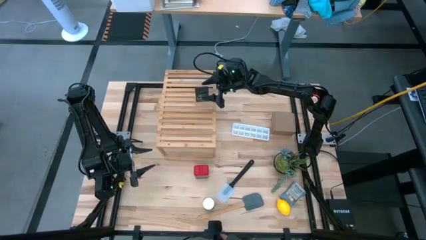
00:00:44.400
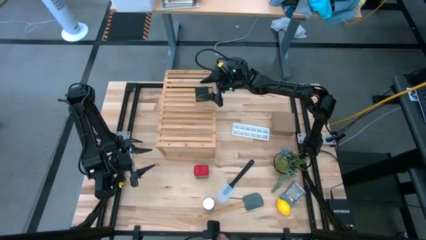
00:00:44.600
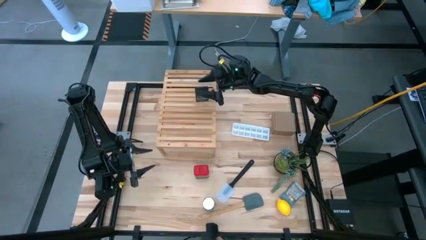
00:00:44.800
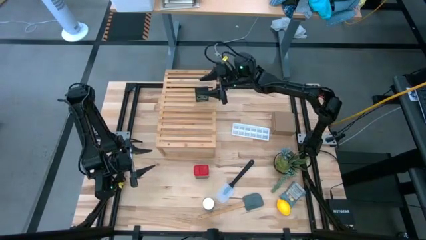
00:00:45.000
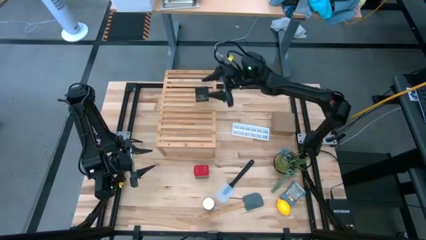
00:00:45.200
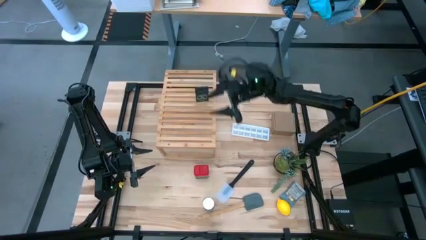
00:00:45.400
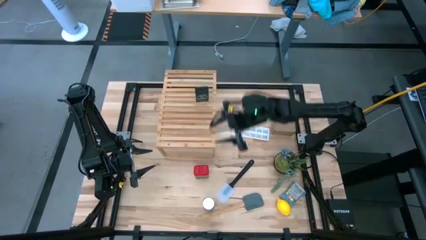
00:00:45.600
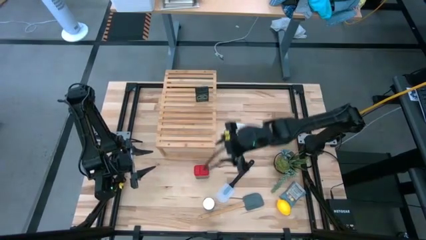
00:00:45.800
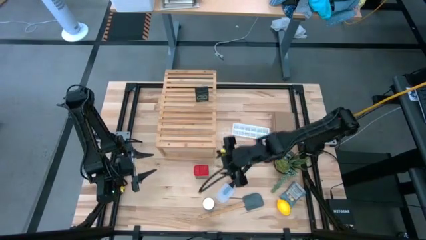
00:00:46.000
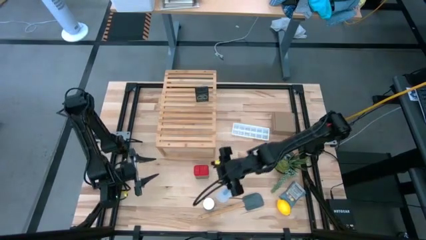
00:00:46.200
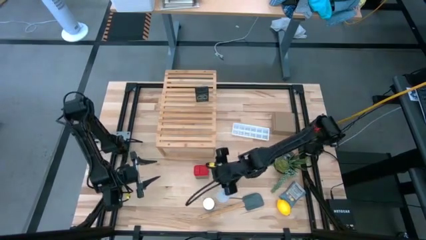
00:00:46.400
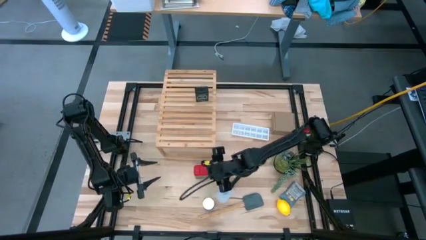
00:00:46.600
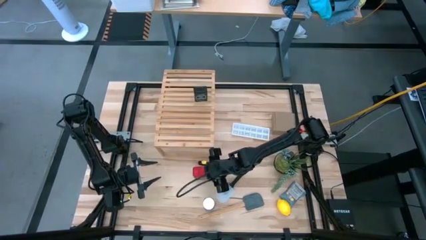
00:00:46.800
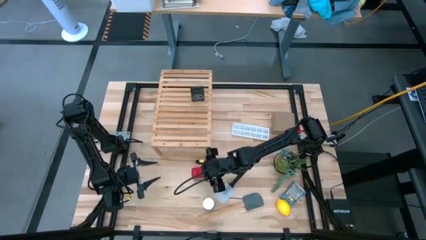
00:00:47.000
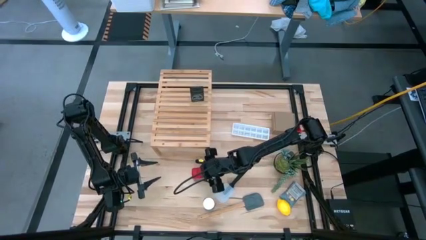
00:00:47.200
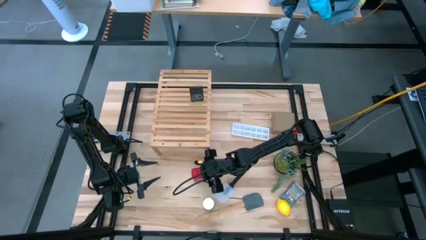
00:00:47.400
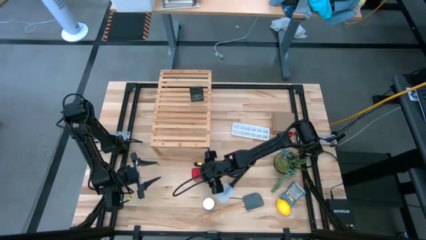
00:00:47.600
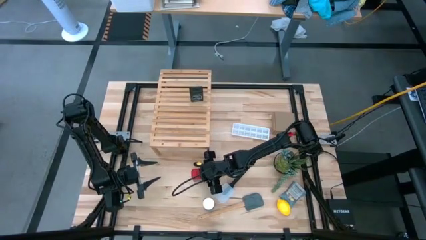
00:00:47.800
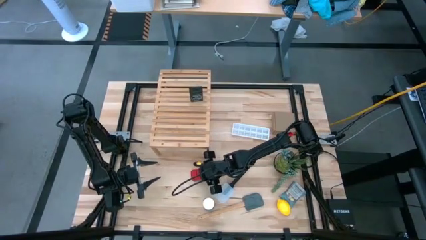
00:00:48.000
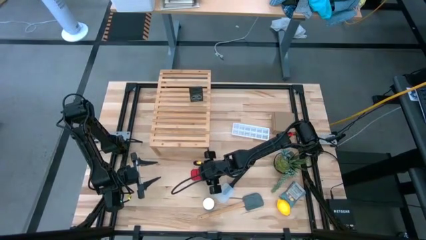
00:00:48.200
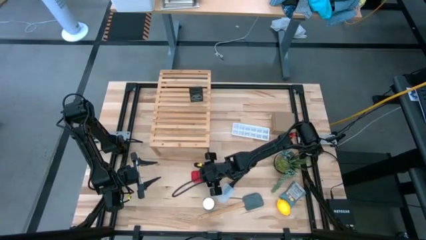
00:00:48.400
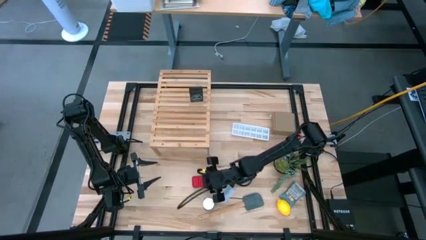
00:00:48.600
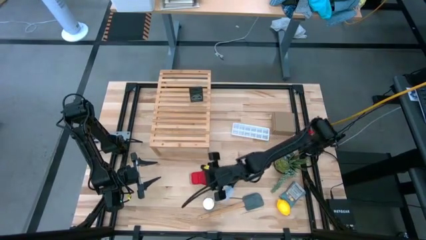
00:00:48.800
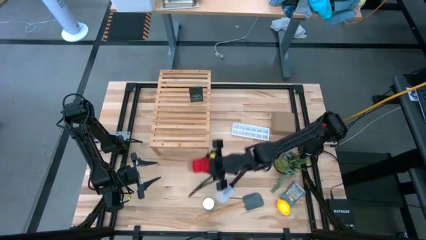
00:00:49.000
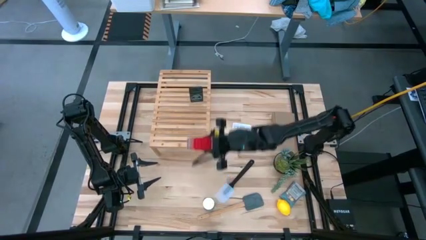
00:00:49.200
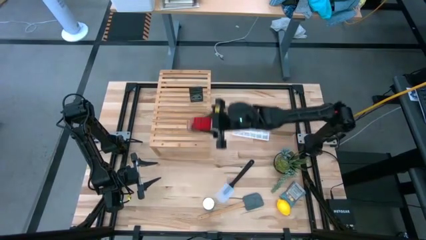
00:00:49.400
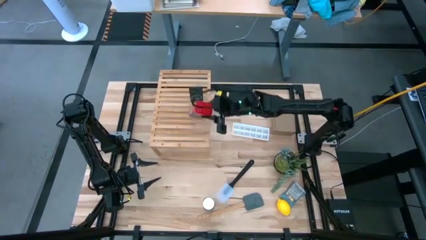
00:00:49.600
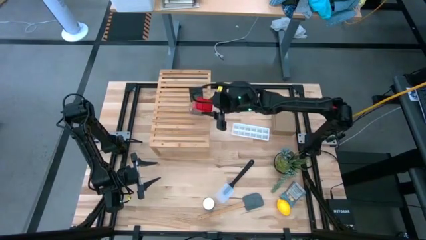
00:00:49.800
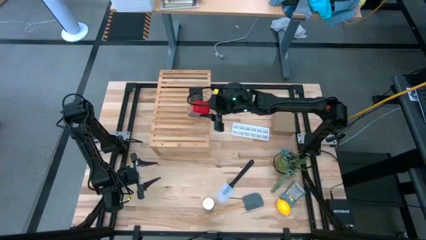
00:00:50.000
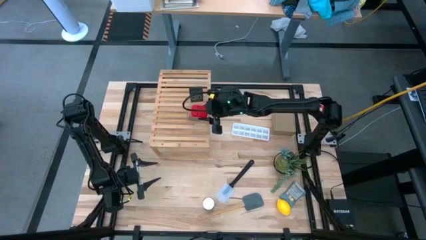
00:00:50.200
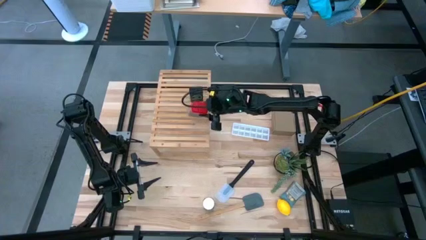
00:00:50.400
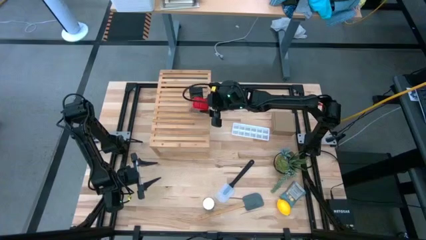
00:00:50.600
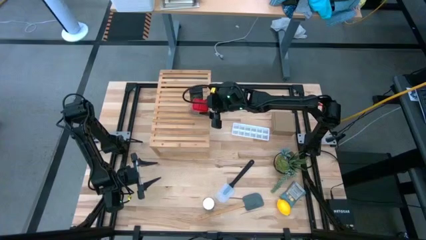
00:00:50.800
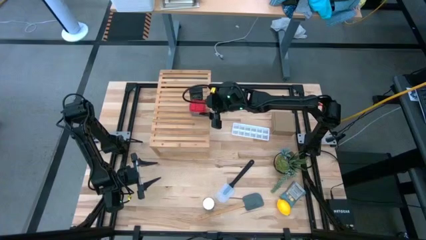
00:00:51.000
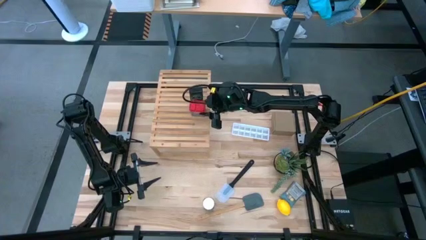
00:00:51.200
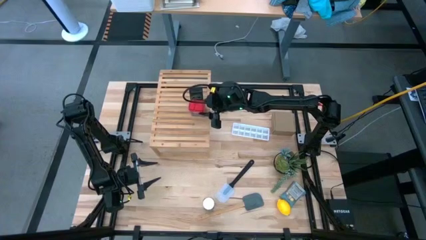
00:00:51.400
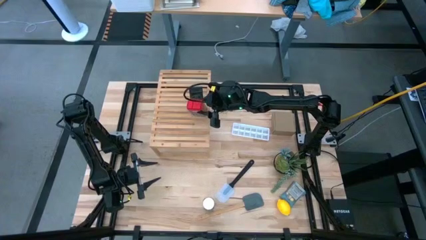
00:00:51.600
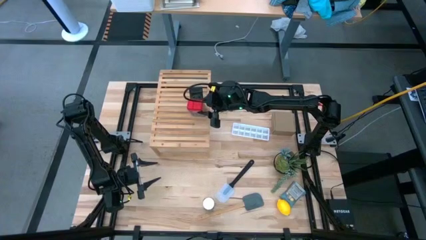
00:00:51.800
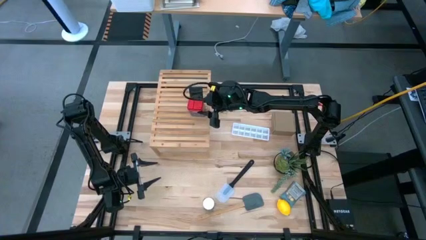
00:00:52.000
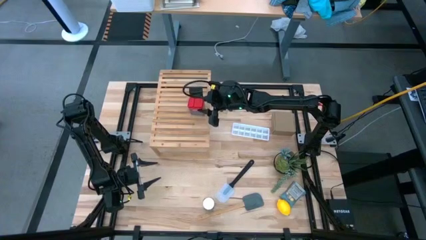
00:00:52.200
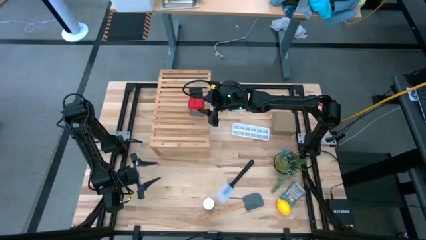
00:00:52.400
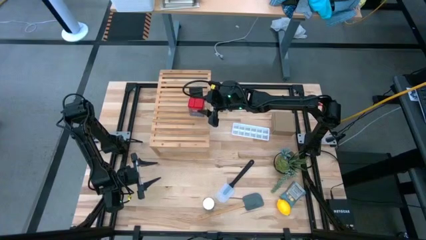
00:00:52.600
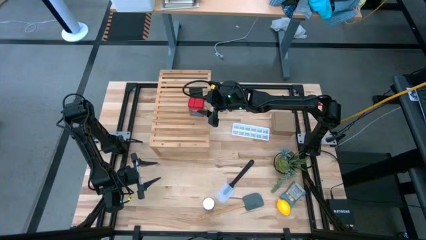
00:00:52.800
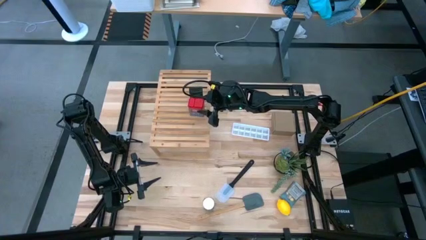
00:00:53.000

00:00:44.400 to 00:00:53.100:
Task: Shelf spices
Put the red seasoning can on the shelf

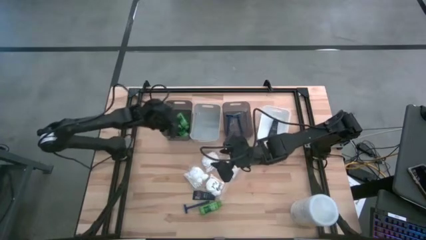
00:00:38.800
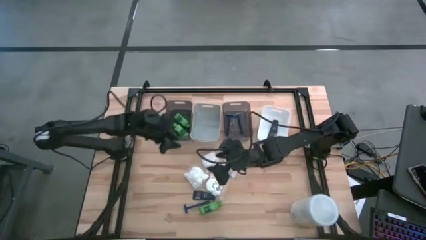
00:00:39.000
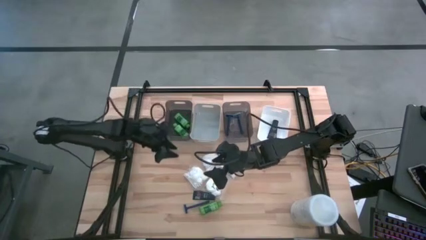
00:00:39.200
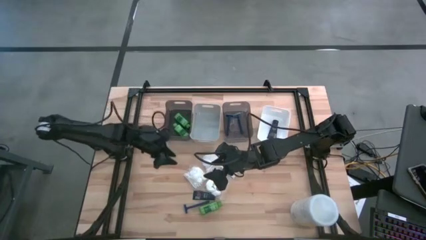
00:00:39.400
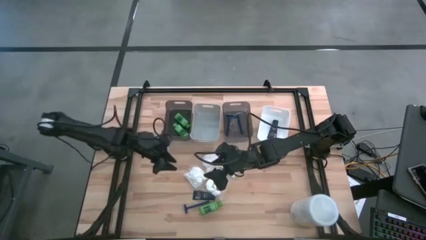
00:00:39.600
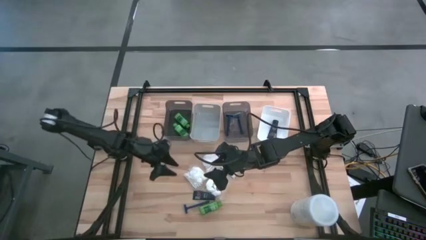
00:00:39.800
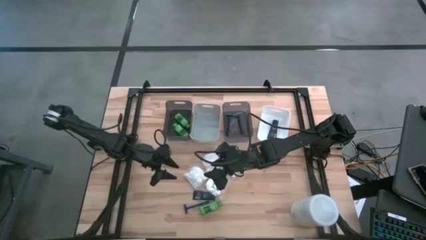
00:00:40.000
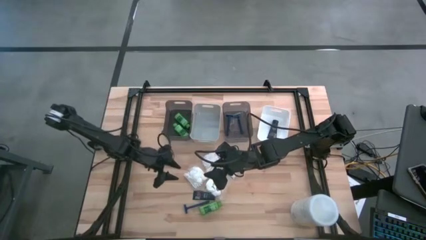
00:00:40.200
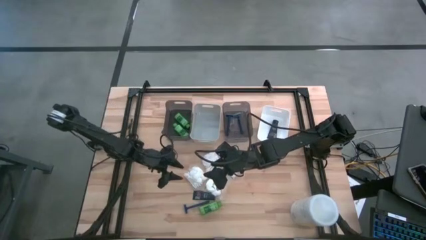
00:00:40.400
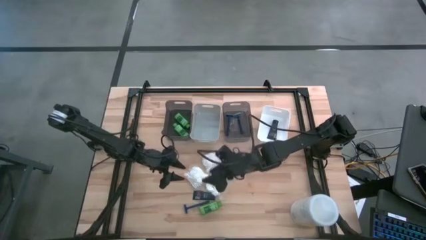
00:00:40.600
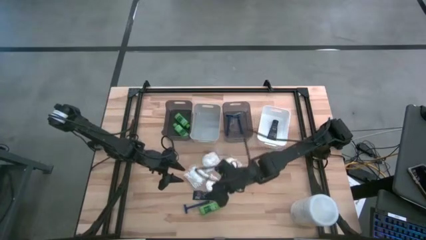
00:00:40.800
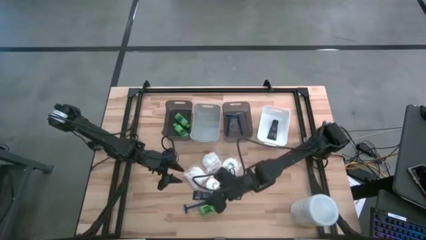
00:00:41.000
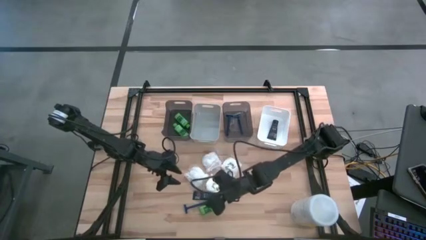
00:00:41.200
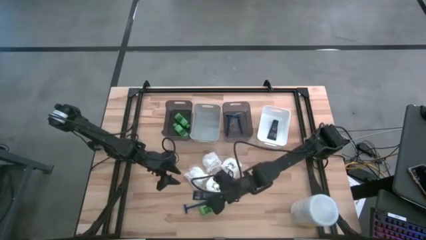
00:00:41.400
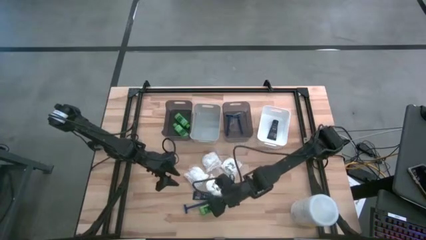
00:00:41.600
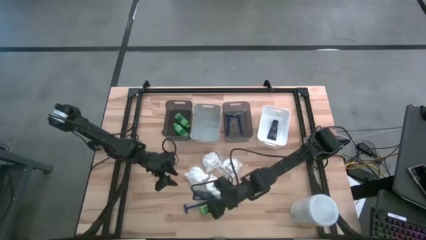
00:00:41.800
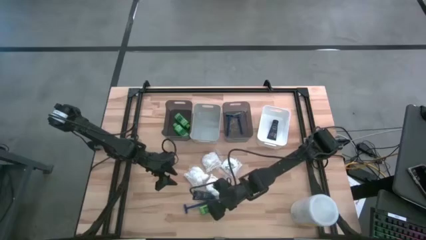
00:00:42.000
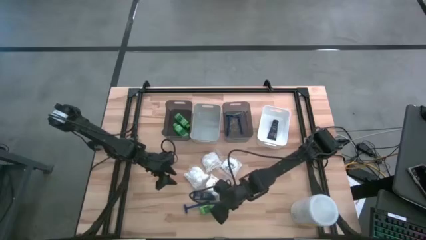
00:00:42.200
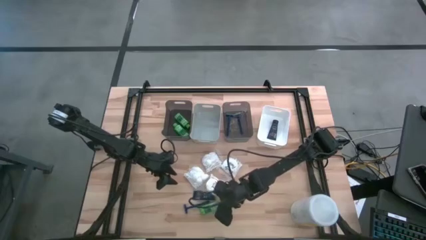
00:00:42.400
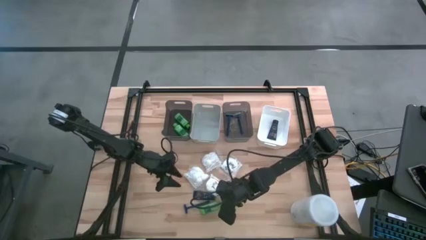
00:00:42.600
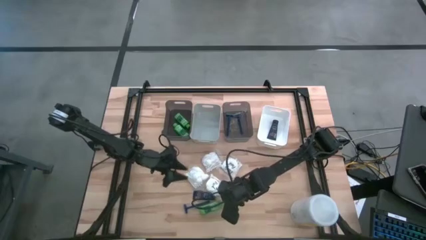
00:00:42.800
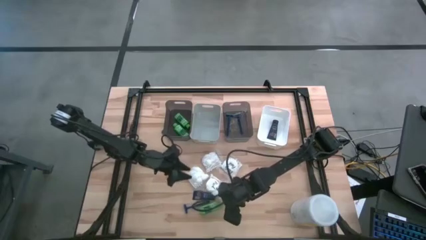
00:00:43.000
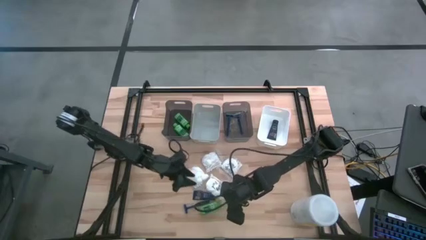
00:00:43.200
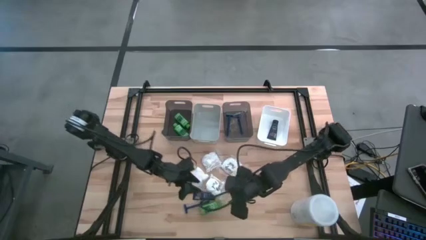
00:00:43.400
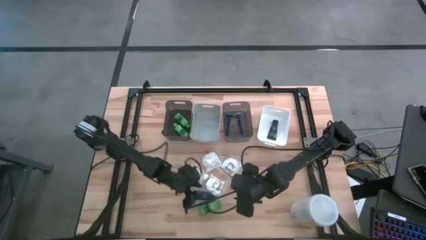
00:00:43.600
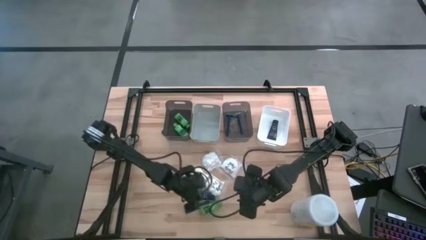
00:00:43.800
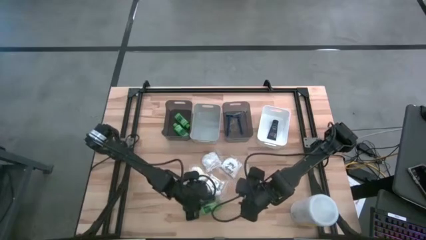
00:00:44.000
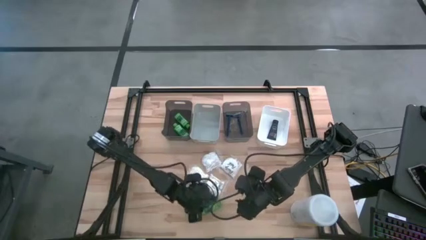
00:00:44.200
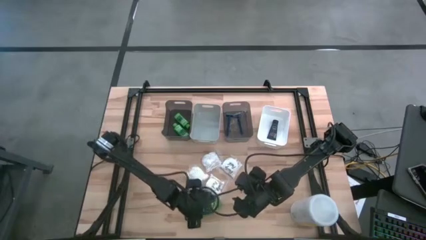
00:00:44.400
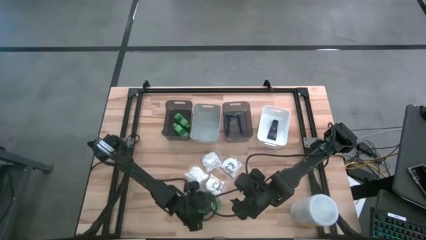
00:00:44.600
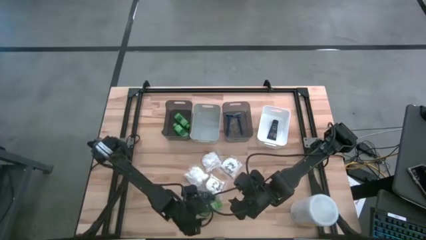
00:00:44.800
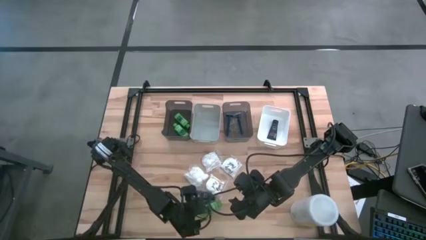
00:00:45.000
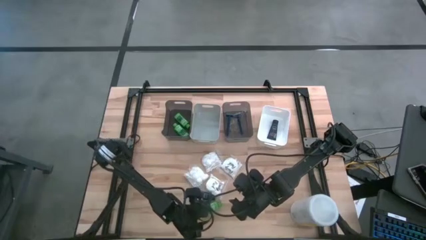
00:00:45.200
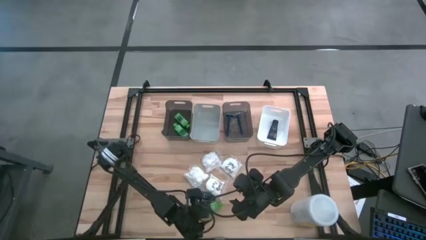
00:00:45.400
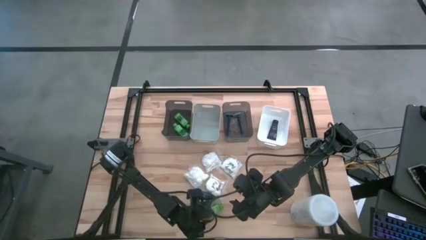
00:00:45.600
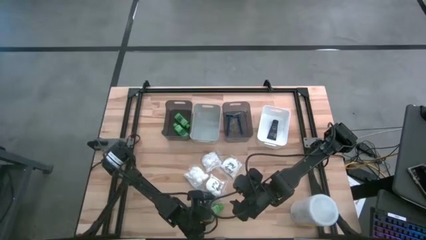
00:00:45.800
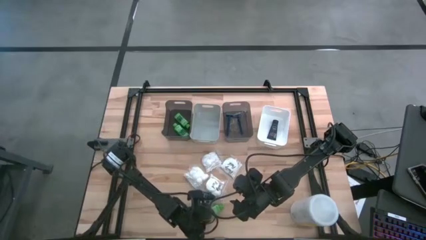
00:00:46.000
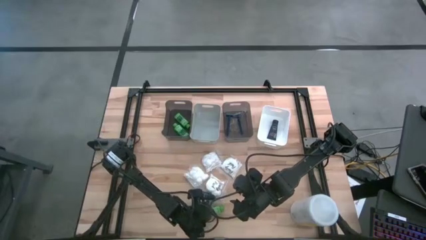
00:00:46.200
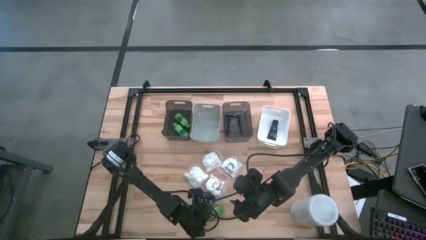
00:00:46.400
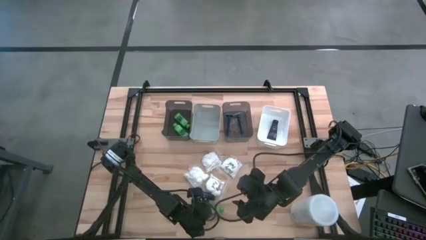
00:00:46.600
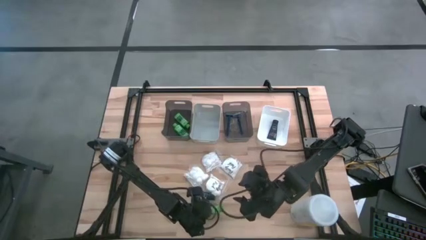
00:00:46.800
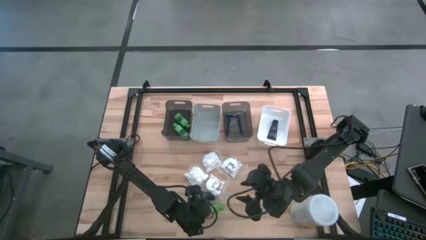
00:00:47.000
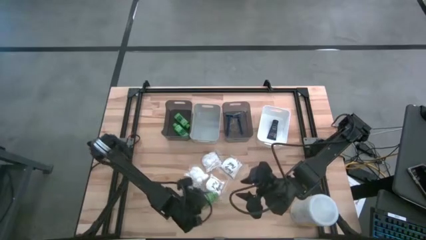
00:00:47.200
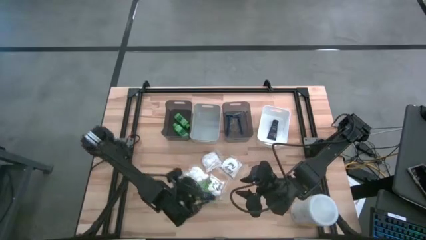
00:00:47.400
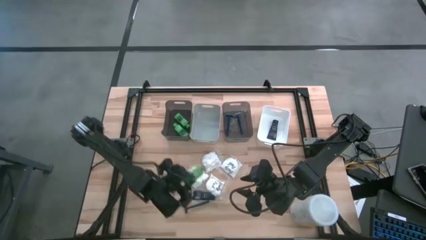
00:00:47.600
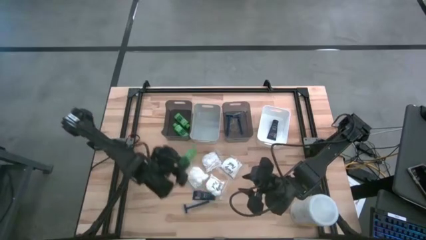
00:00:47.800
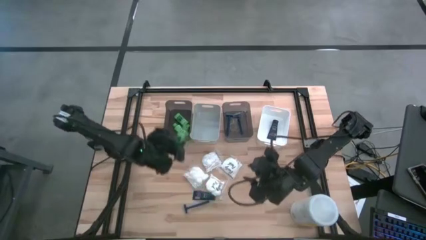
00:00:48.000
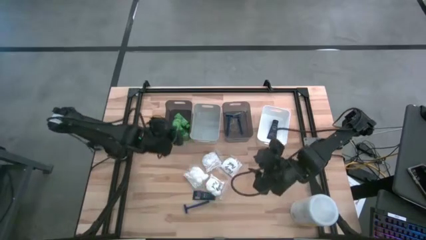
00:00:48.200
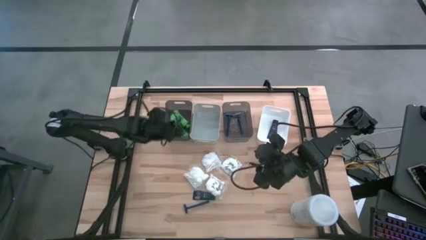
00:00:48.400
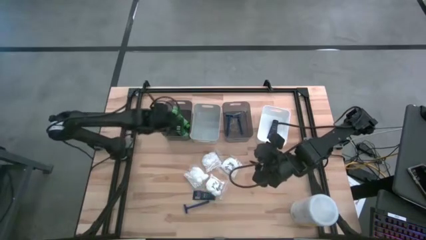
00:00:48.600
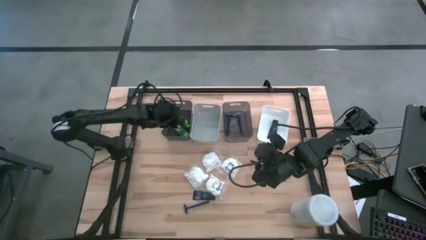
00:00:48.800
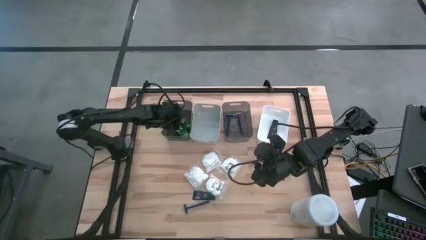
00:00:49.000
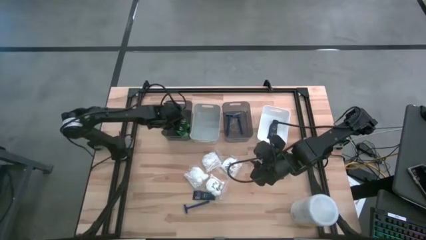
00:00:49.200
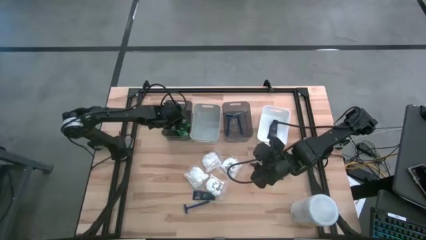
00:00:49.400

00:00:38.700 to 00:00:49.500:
Task: Pick & Place Travel size toiletries
Put the green shampoo into the left black bin
